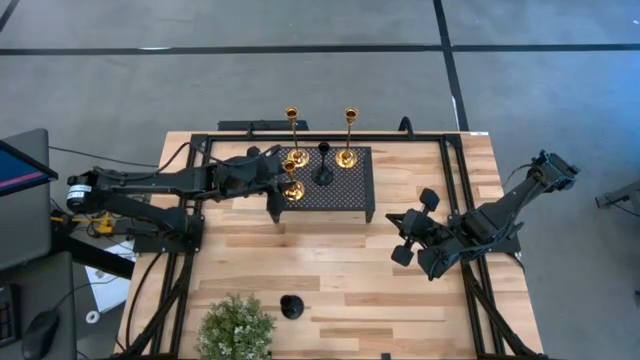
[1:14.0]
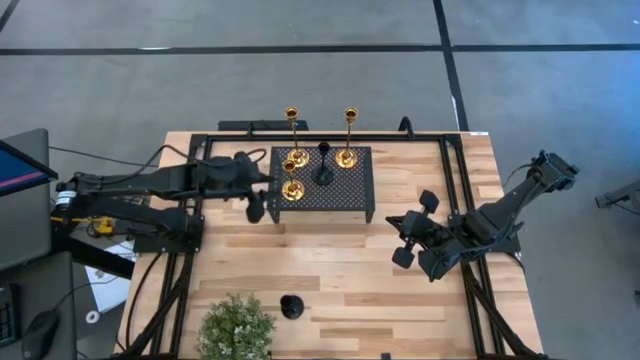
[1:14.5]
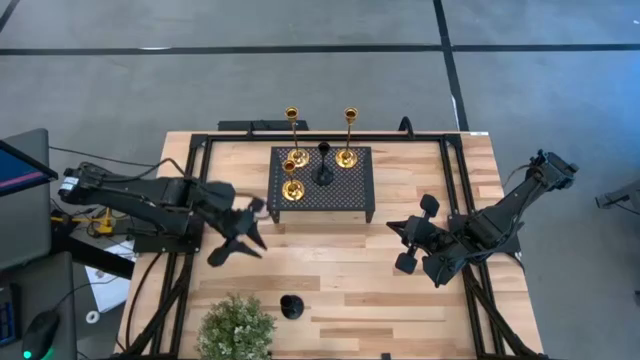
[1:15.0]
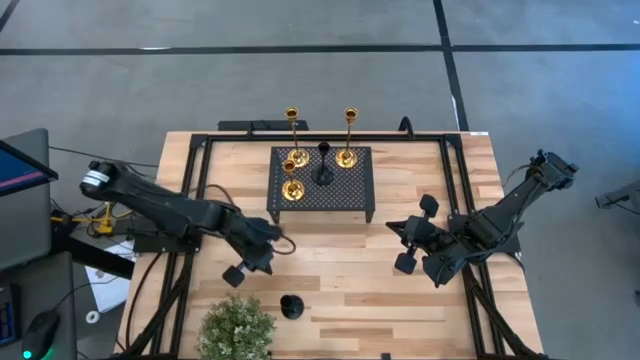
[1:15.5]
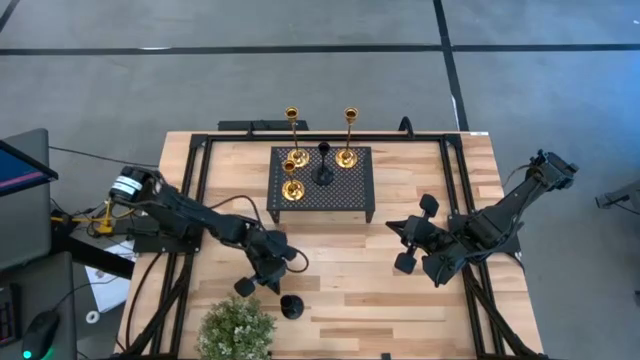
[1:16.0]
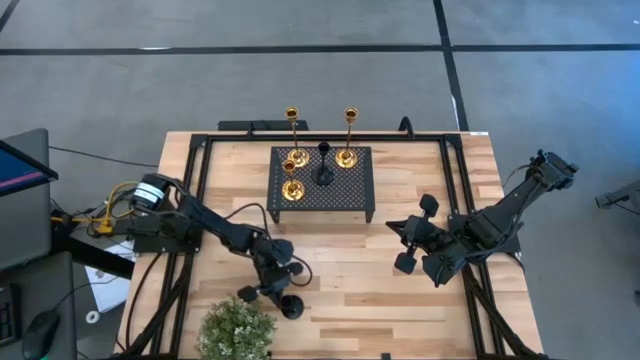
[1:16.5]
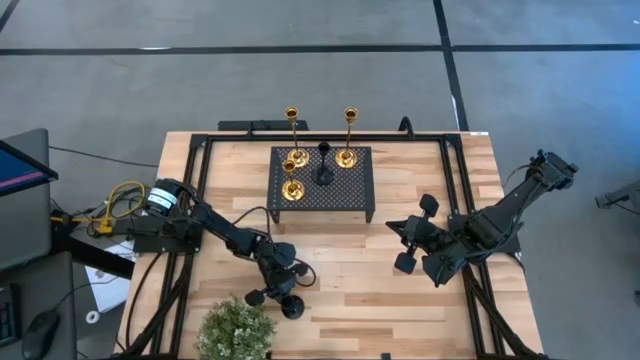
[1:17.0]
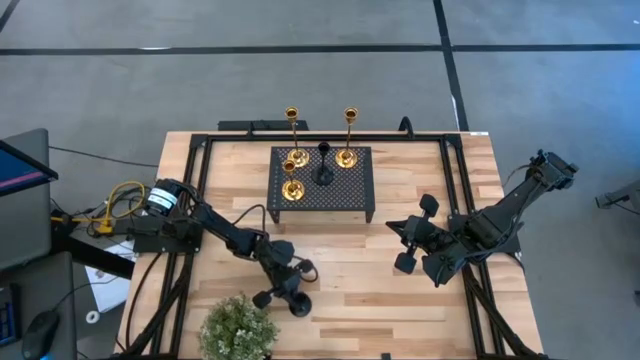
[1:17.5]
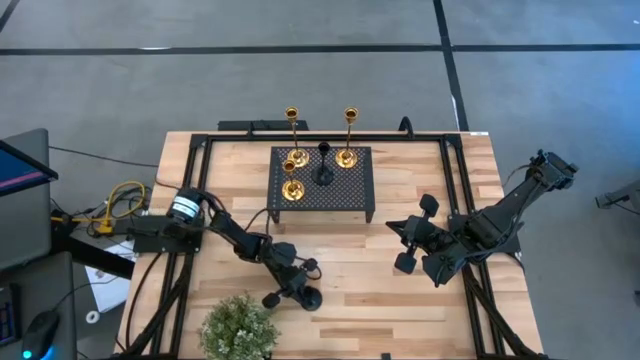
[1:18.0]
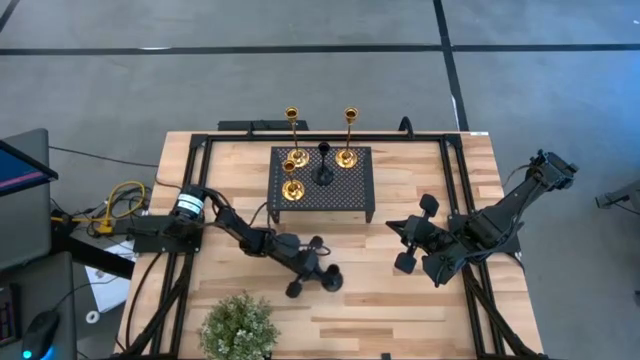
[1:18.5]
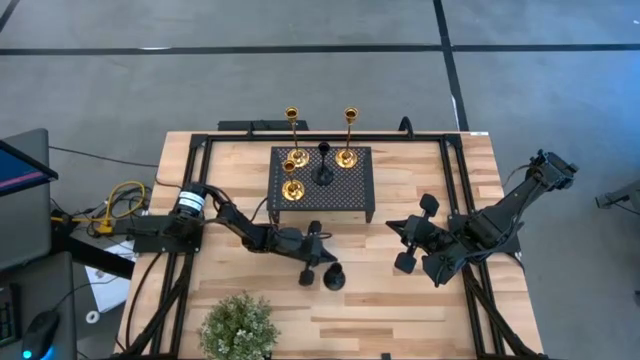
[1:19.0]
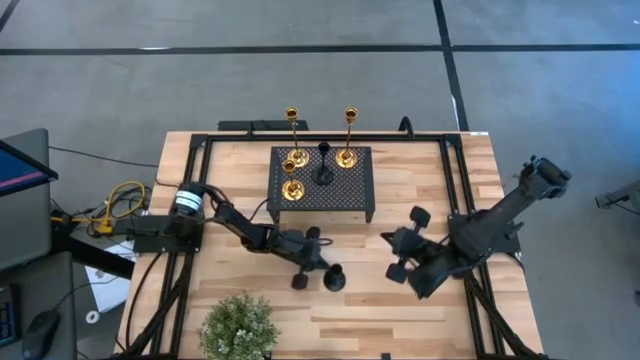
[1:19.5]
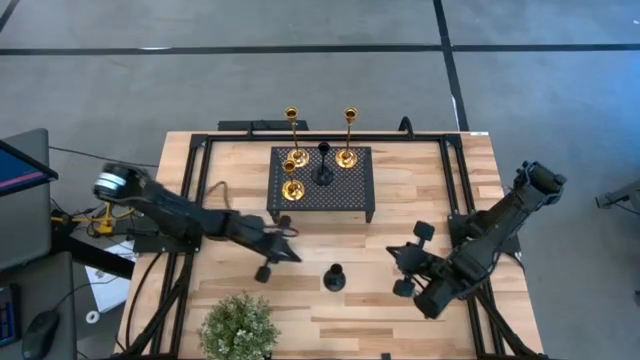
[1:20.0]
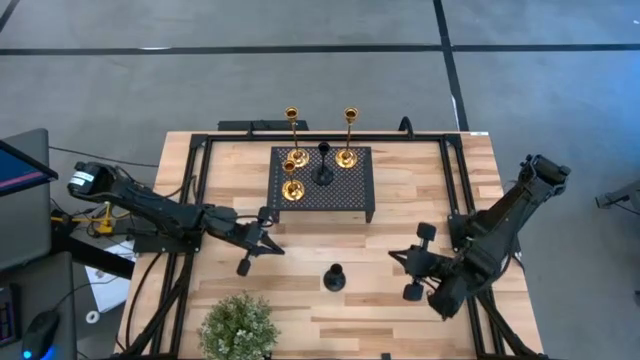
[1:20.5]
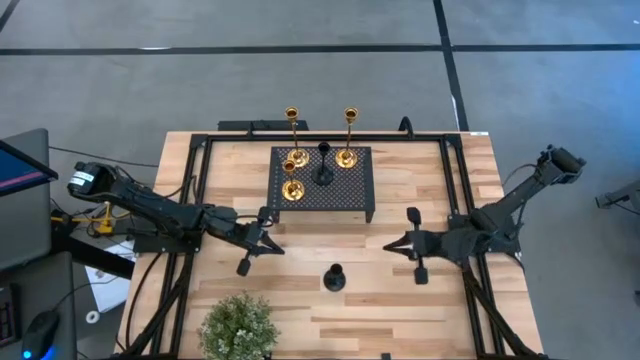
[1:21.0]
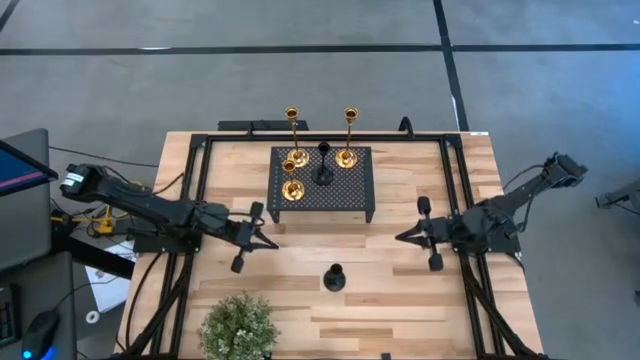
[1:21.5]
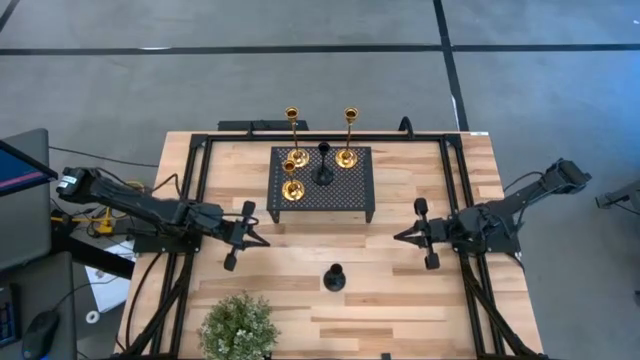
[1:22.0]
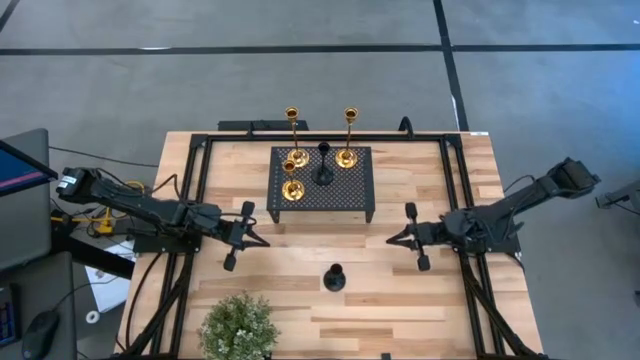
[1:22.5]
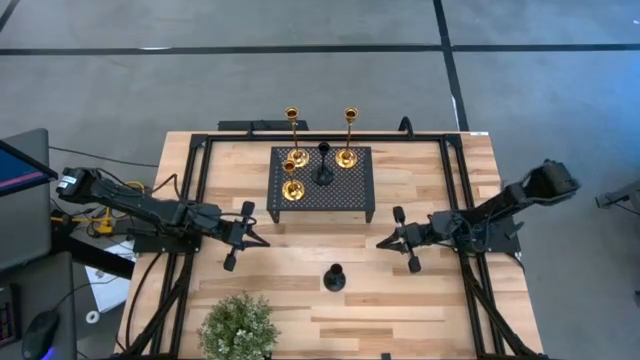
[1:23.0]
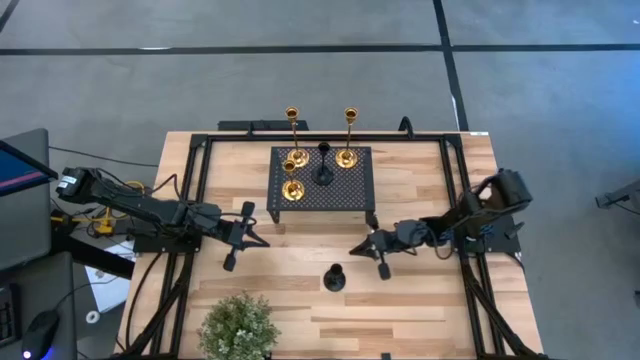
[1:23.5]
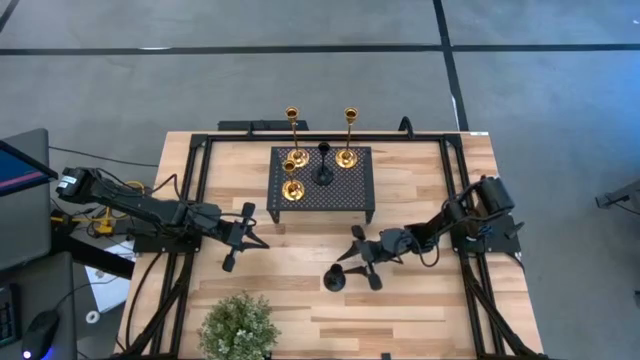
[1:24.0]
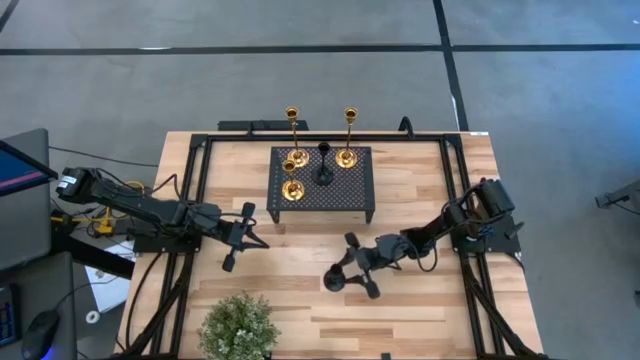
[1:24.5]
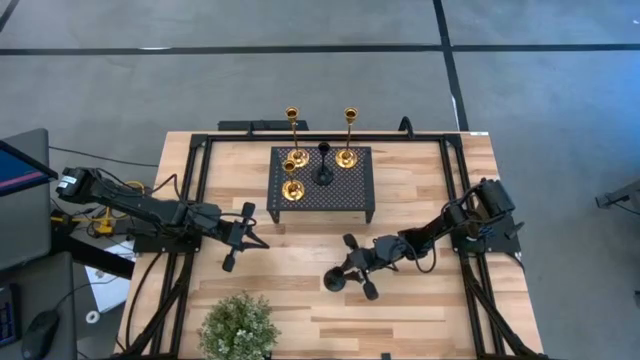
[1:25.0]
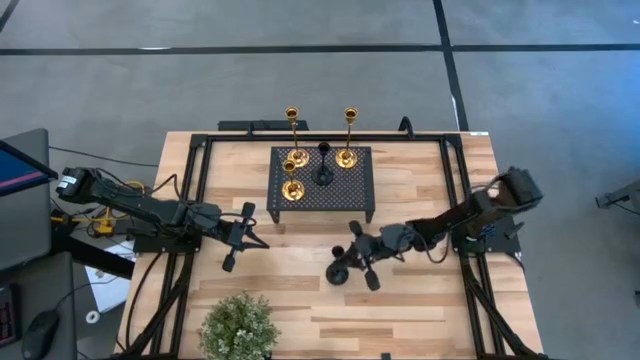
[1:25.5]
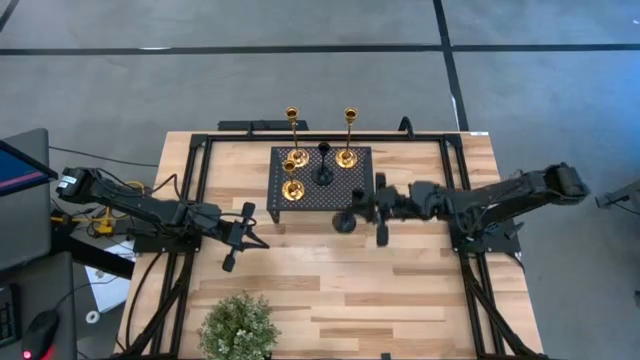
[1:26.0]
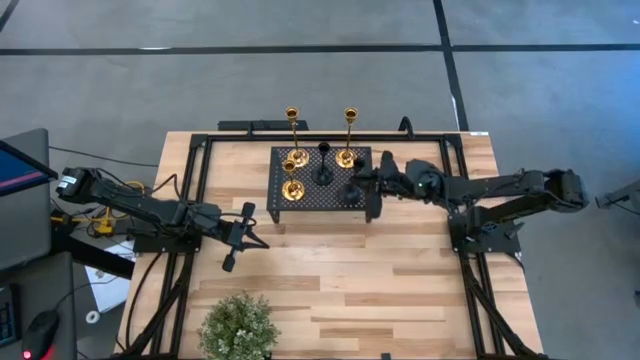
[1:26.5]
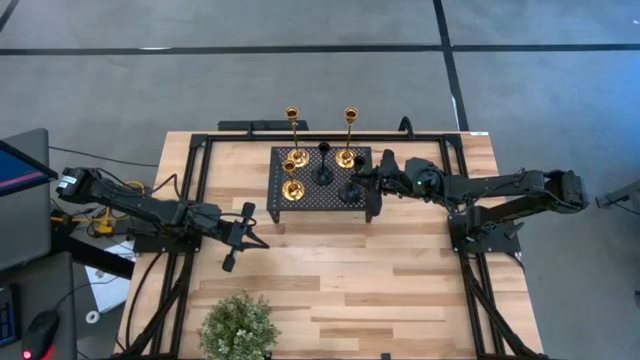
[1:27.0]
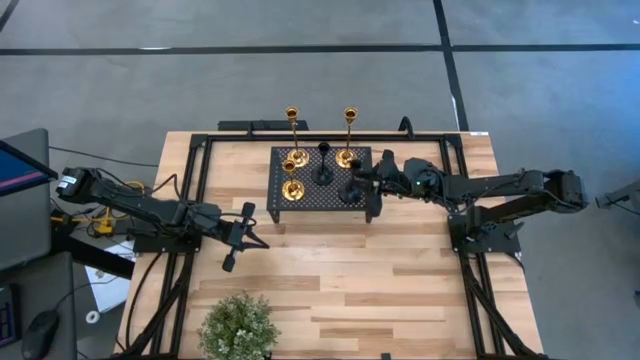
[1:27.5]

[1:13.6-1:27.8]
Task: Pick & Place candle stick holders
Put the black candle holder on the shelf

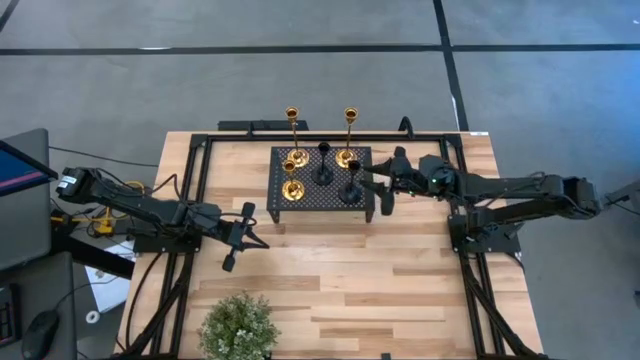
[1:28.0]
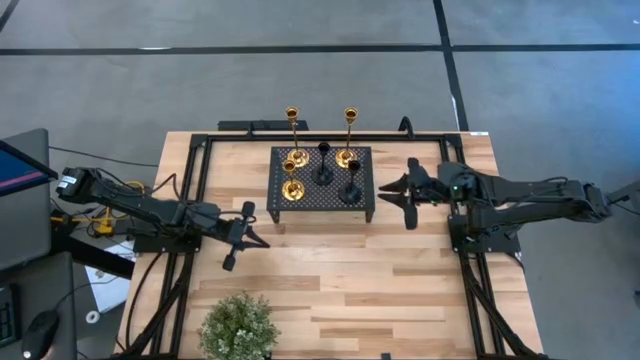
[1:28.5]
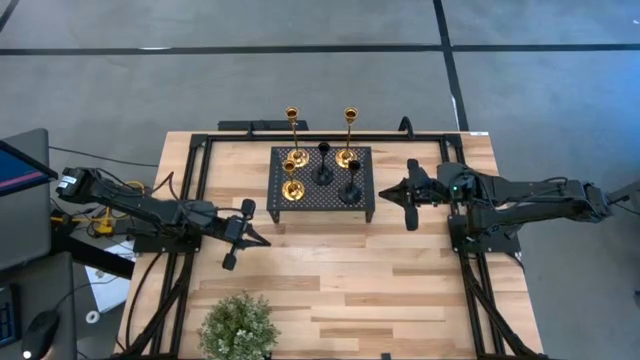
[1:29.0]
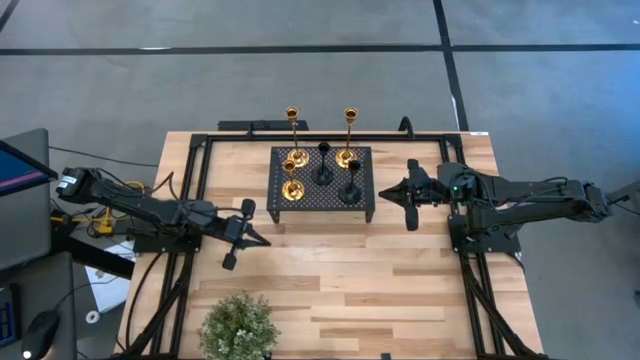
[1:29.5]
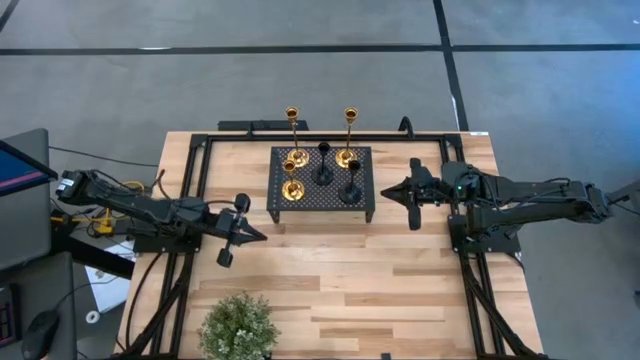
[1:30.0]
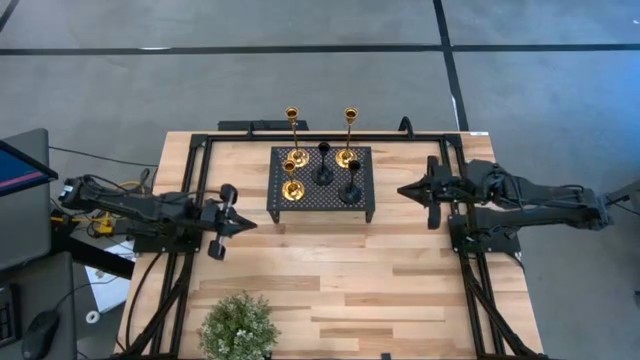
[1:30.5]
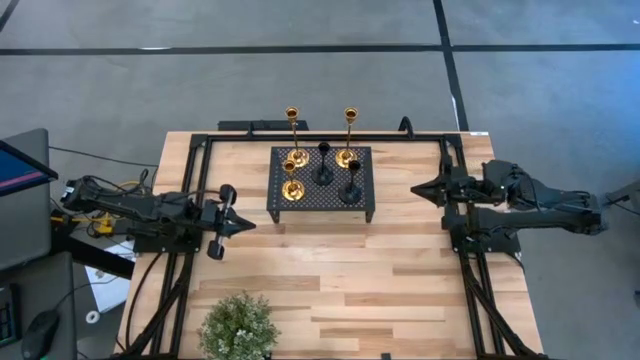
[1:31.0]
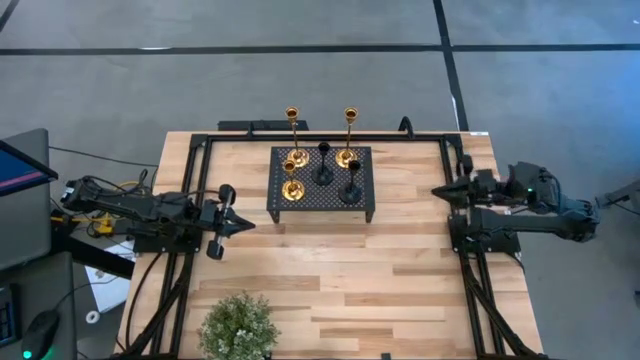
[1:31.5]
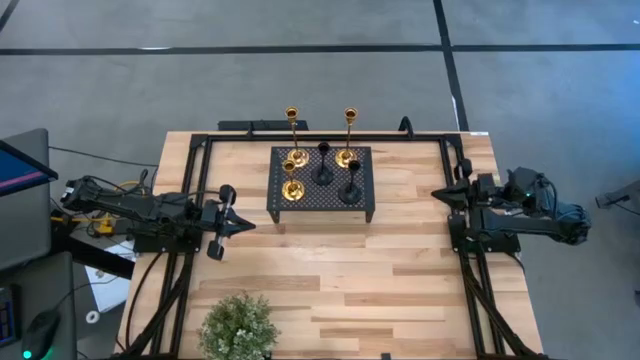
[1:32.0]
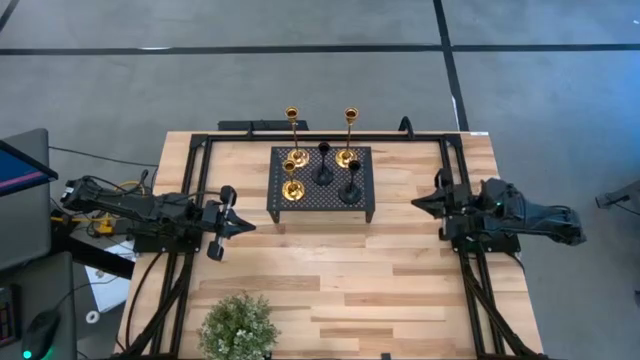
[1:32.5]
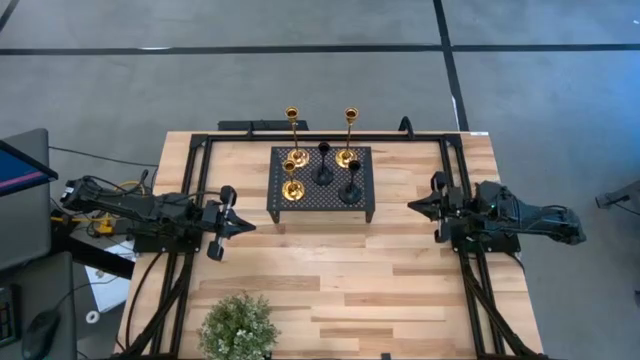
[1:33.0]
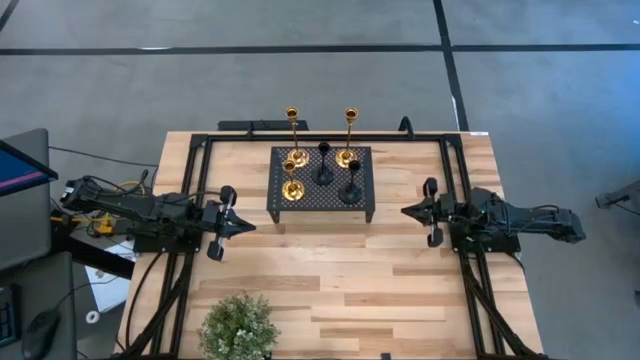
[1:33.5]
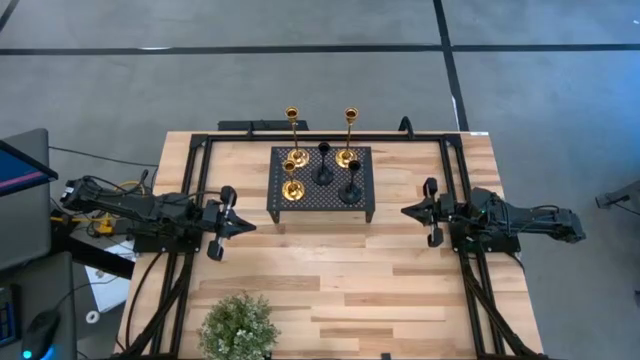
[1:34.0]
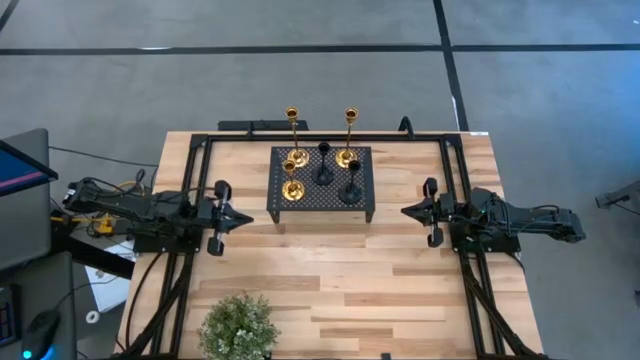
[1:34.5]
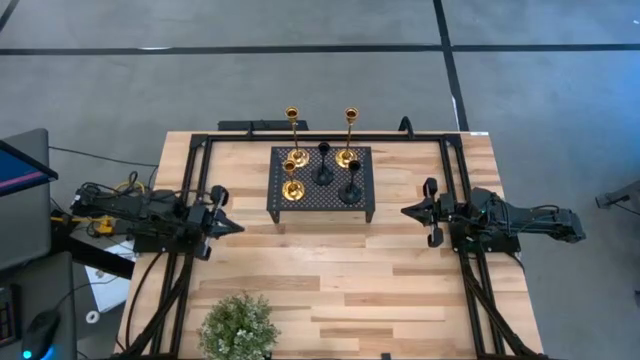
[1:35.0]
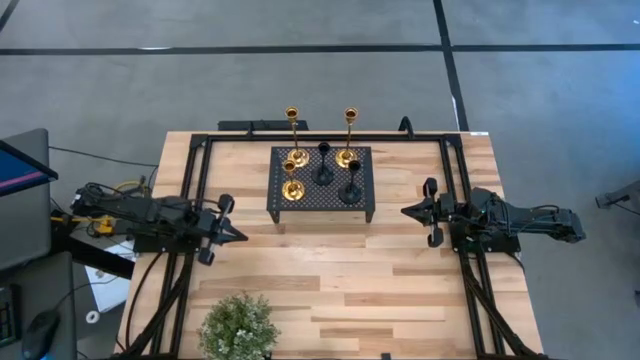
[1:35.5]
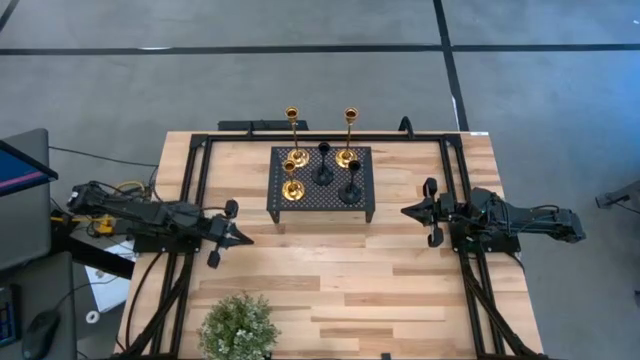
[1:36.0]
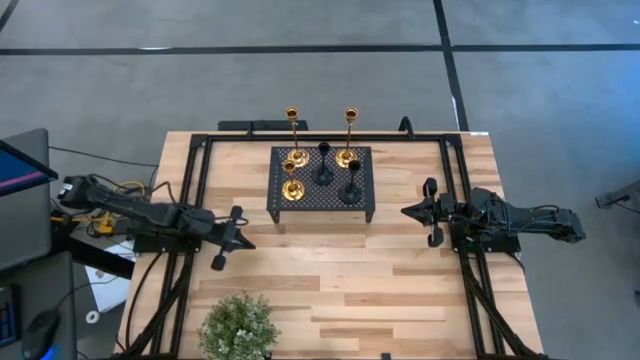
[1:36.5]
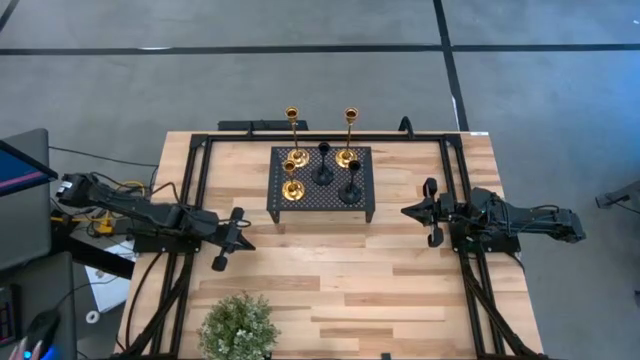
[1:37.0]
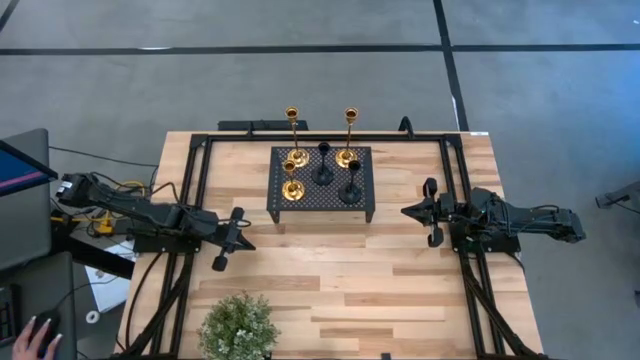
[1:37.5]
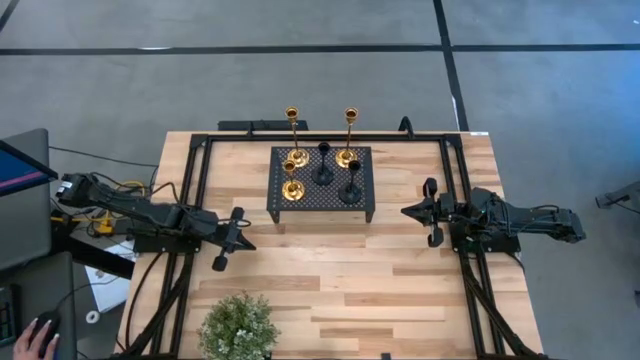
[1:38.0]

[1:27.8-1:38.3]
Return to Home Position
